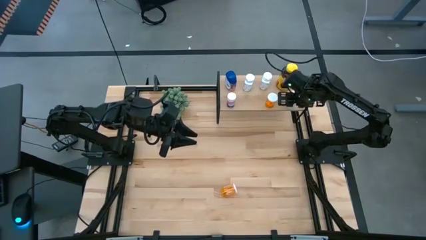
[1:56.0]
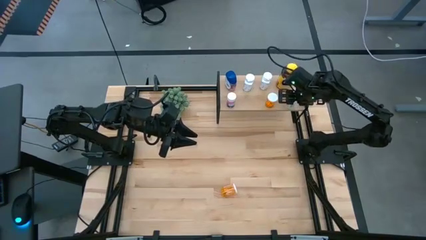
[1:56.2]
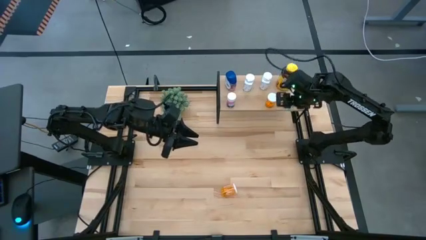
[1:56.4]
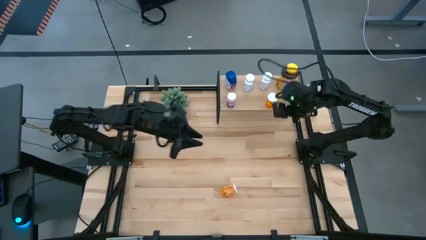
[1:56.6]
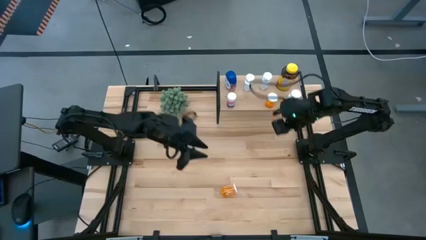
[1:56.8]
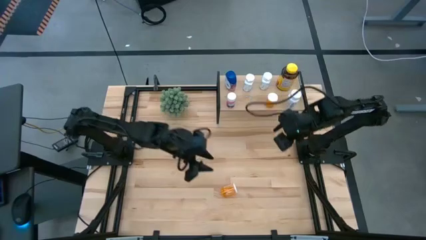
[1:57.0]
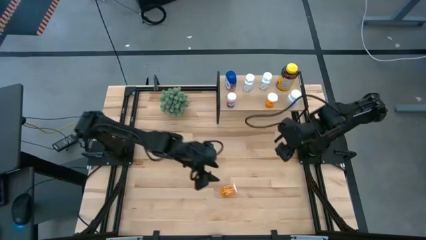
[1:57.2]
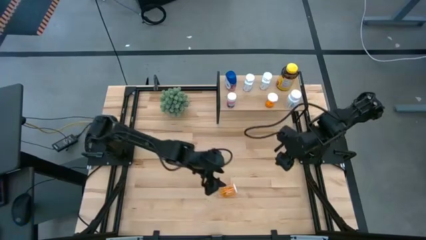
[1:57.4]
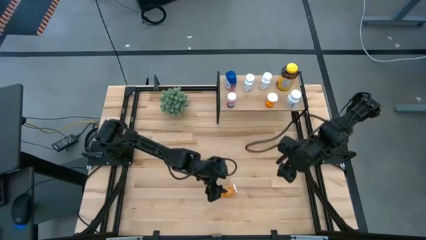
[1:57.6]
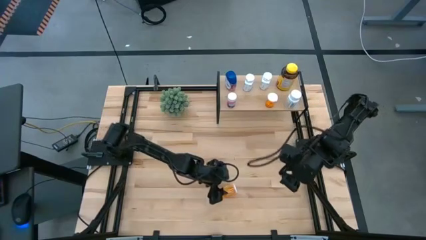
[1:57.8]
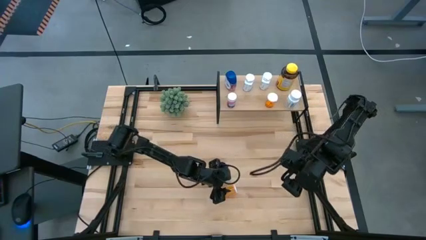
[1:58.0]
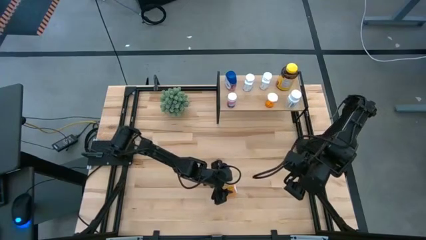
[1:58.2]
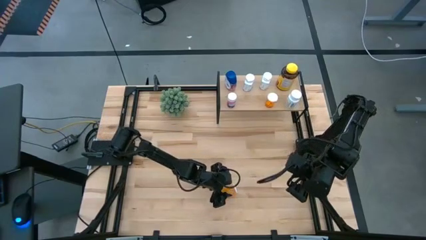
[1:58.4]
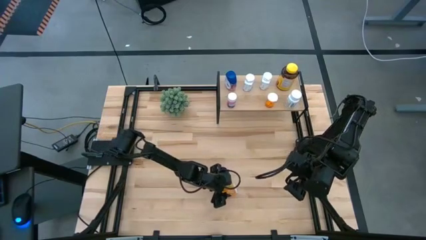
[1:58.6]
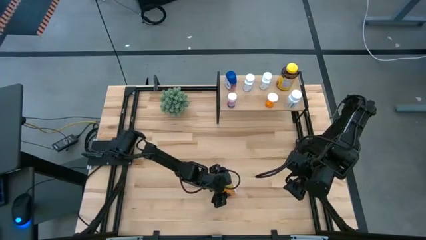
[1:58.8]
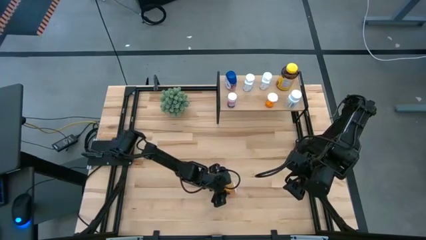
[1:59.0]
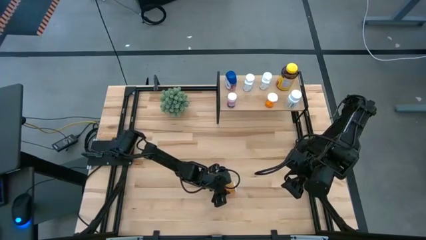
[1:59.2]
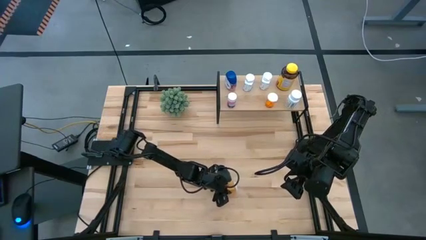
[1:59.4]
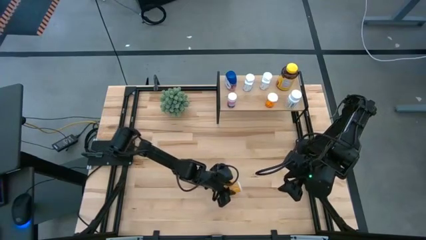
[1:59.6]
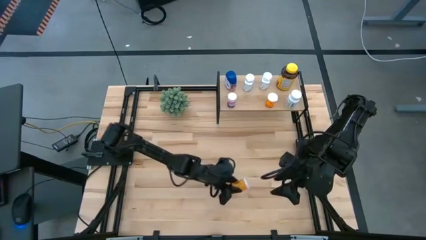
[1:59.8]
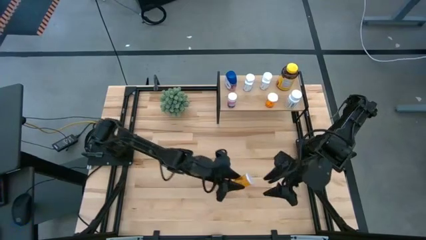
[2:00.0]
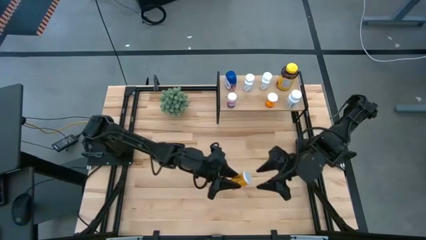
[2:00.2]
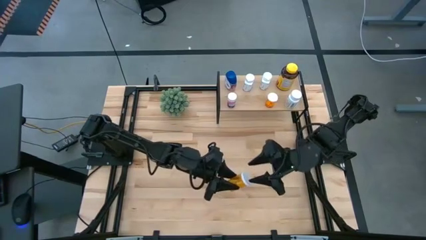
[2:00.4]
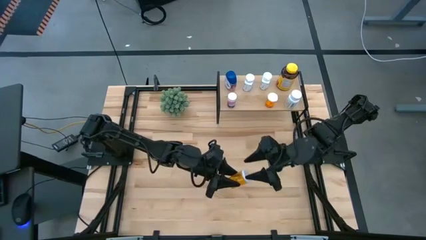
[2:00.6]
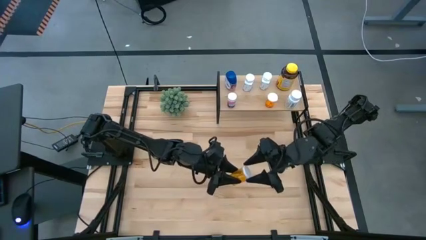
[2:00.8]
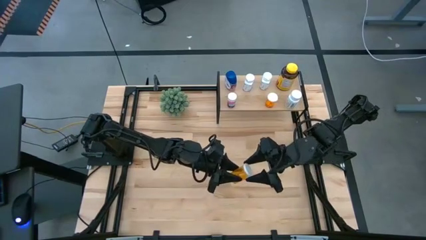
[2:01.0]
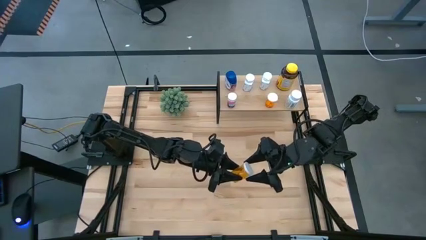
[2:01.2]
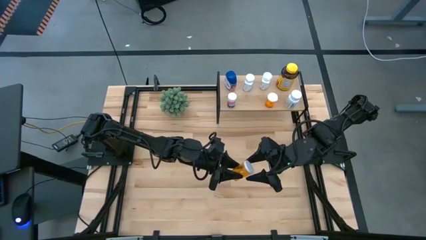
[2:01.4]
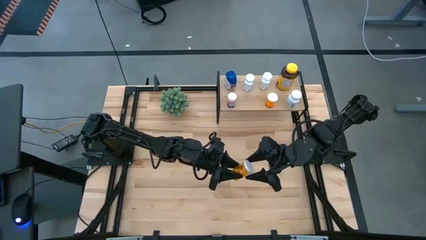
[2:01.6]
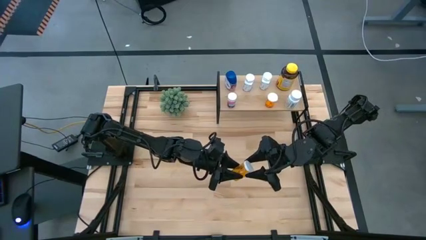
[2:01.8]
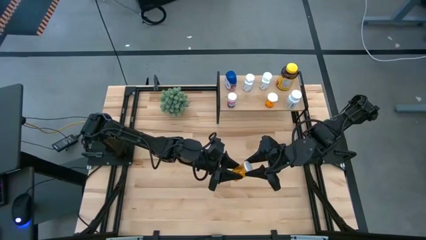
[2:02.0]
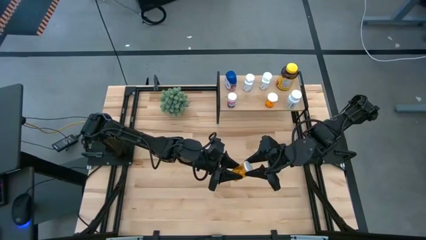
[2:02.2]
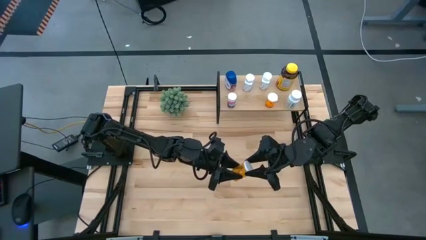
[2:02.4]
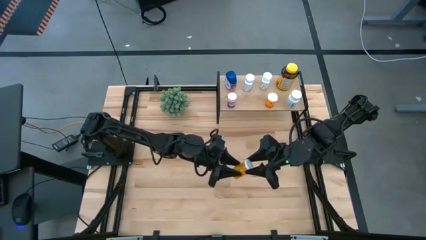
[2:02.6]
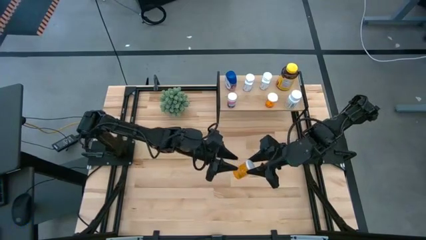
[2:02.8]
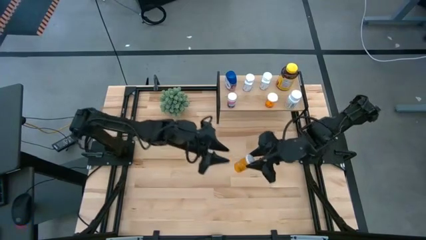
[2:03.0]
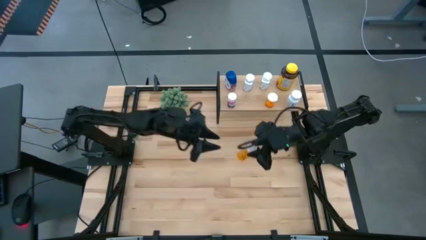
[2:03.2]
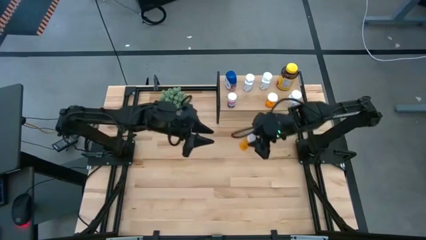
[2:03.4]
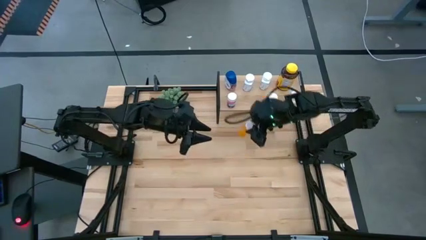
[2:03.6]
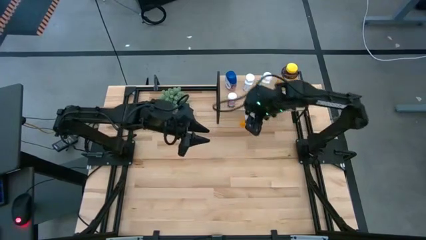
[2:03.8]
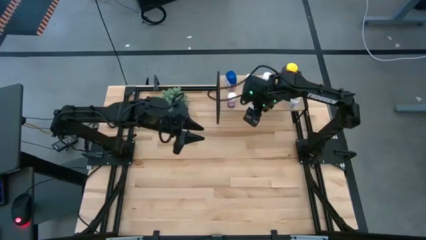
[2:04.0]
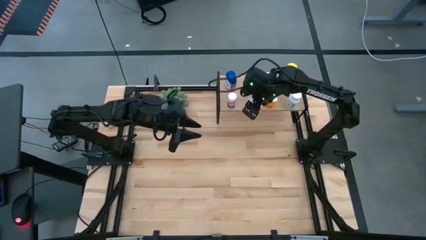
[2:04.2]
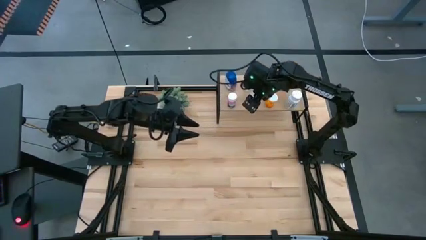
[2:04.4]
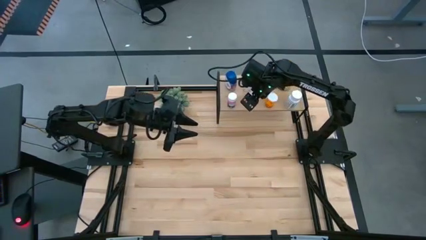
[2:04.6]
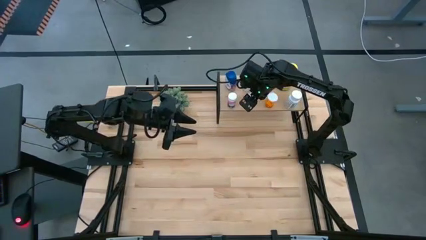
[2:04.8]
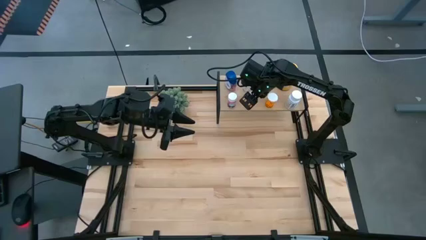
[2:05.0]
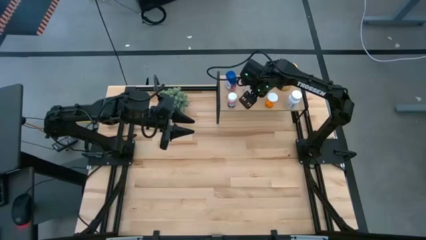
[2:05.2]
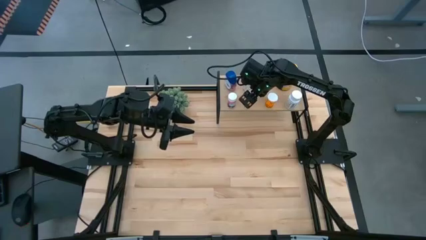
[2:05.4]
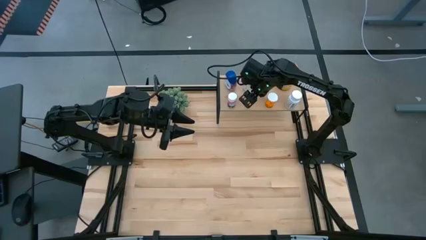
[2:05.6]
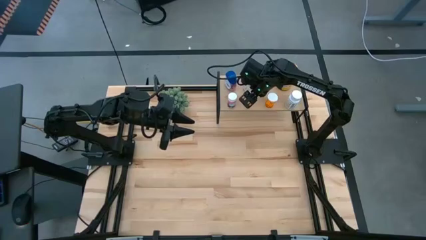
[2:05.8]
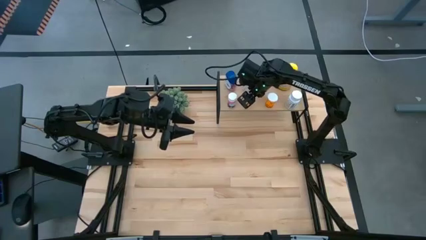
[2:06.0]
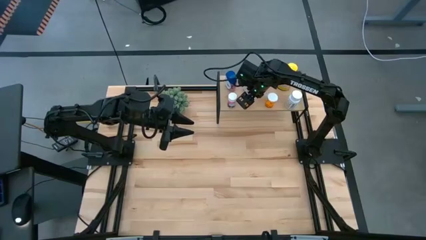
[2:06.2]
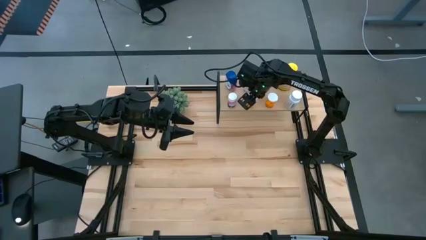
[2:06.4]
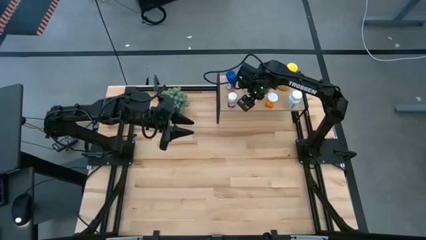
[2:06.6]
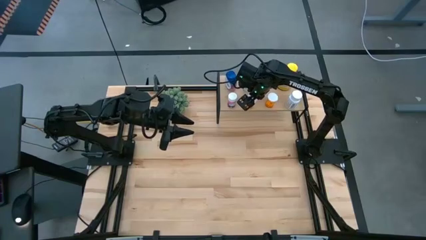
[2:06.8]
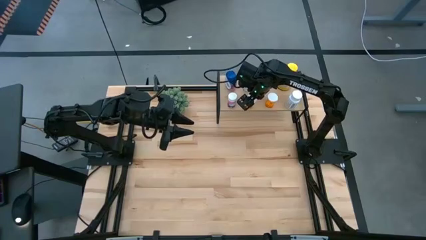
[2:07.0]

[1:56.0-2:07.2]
Task: Pick and place medicine bottles onto shelf by color
Put the orange medicine bottle on the shelf

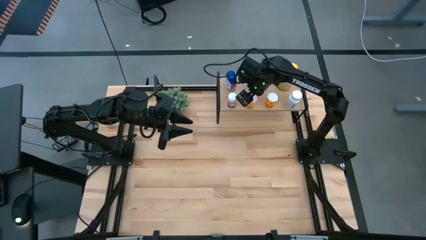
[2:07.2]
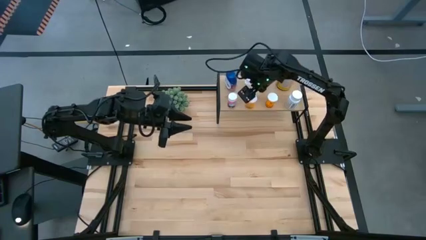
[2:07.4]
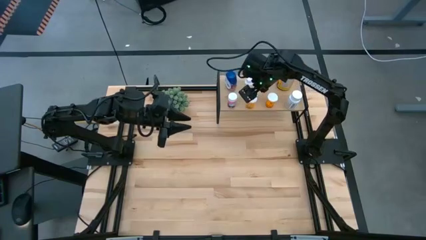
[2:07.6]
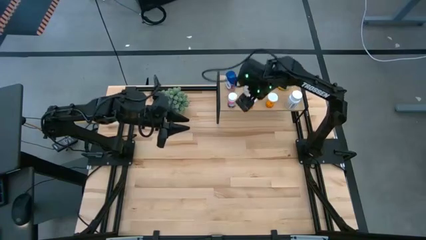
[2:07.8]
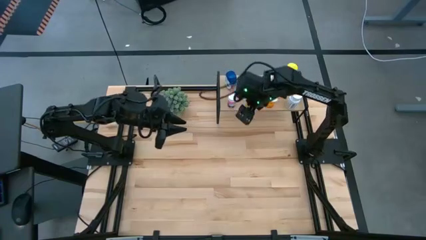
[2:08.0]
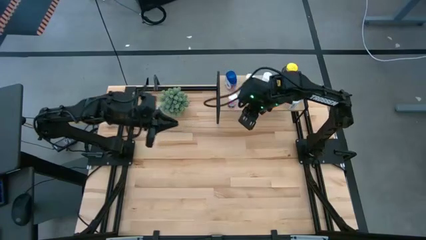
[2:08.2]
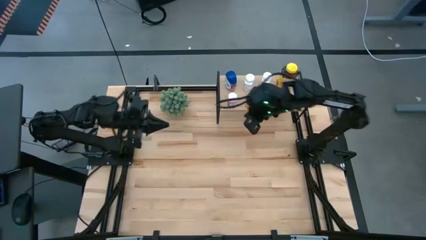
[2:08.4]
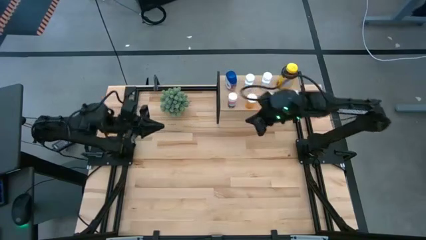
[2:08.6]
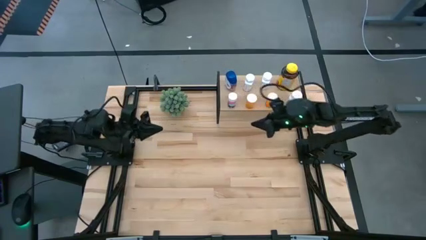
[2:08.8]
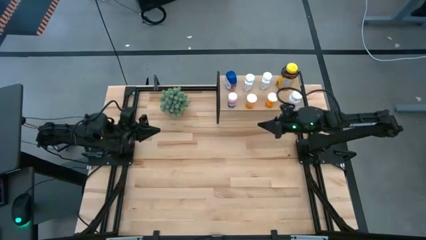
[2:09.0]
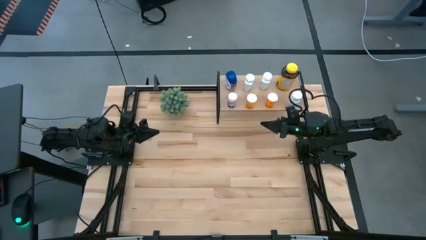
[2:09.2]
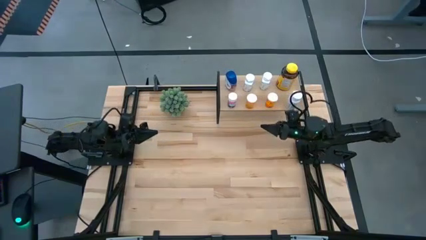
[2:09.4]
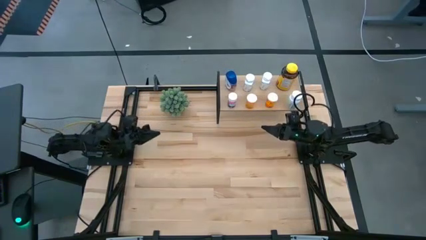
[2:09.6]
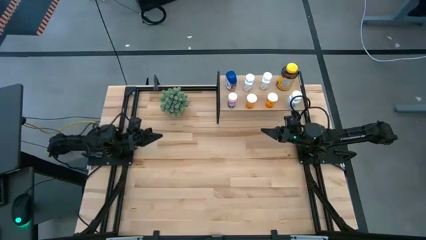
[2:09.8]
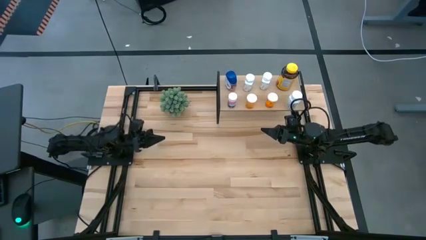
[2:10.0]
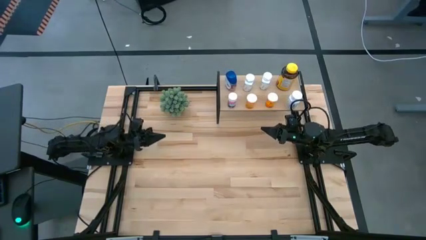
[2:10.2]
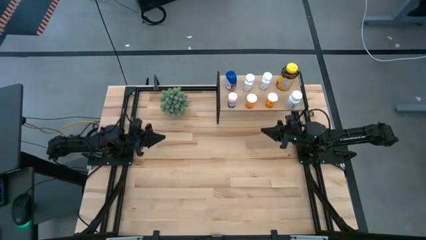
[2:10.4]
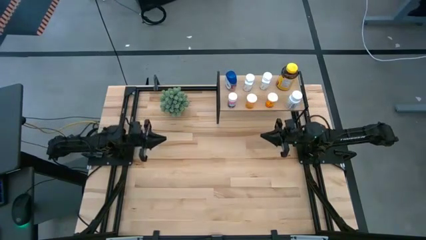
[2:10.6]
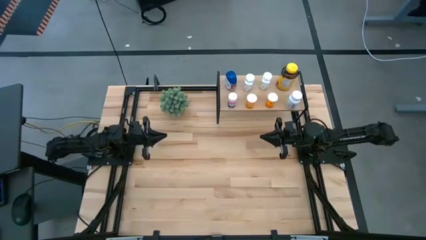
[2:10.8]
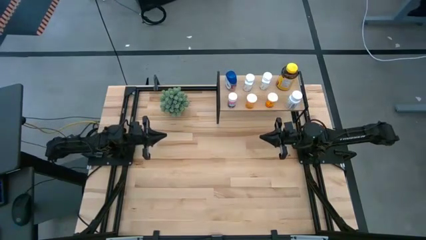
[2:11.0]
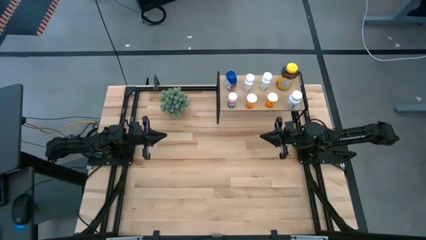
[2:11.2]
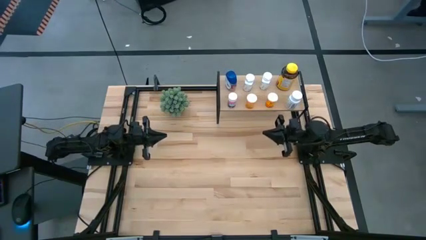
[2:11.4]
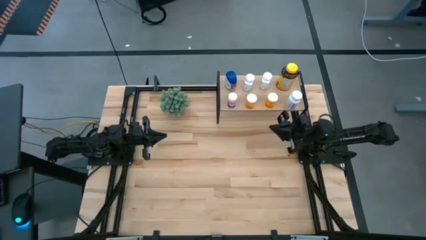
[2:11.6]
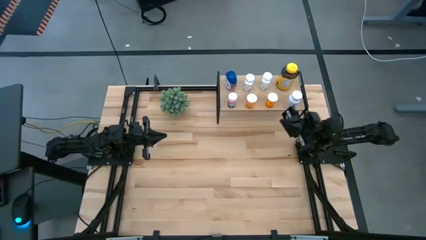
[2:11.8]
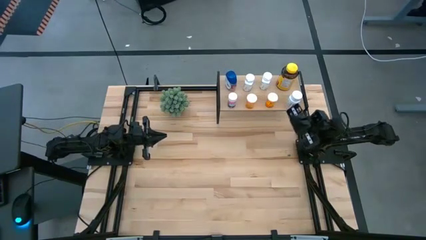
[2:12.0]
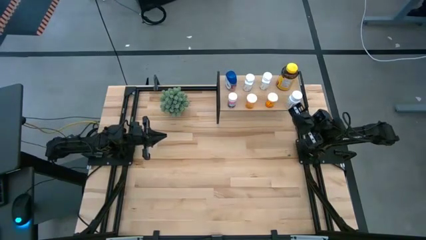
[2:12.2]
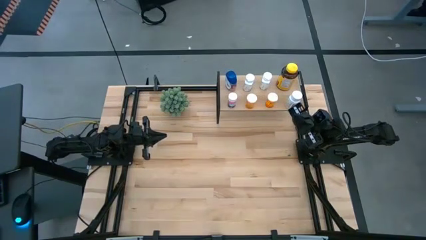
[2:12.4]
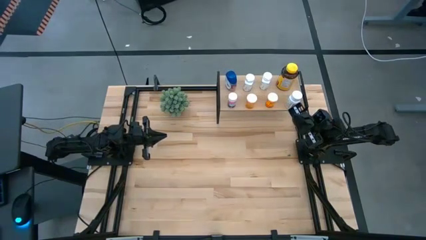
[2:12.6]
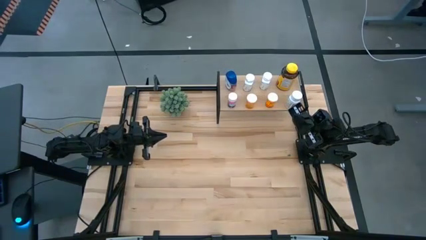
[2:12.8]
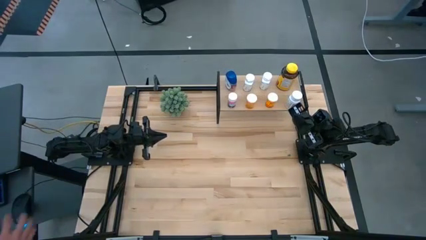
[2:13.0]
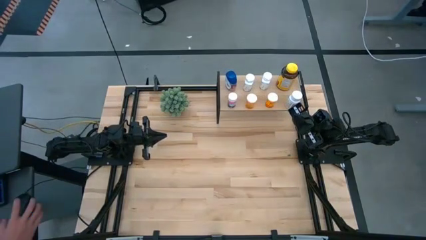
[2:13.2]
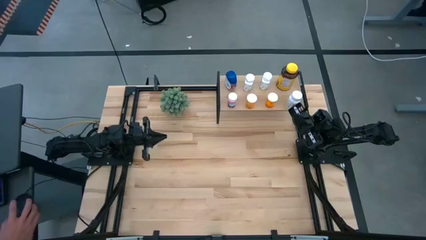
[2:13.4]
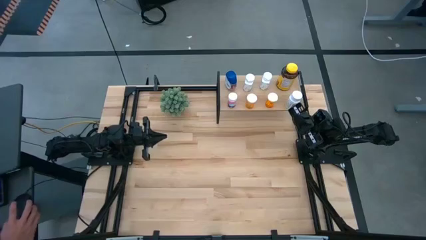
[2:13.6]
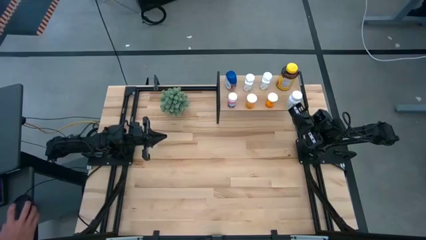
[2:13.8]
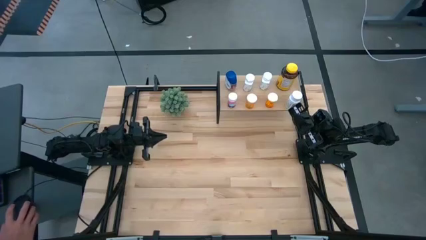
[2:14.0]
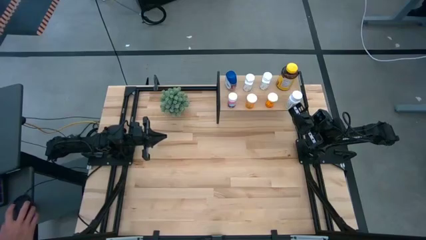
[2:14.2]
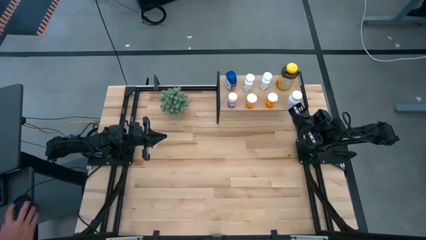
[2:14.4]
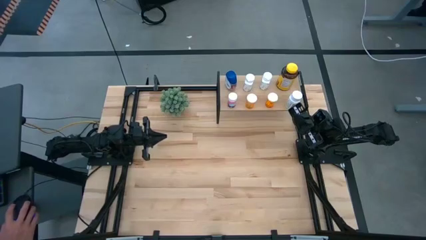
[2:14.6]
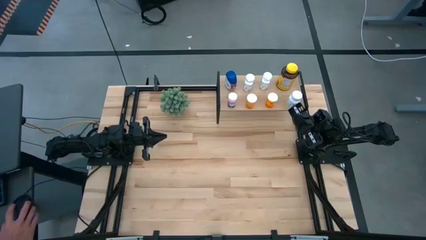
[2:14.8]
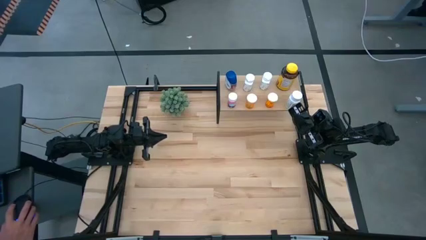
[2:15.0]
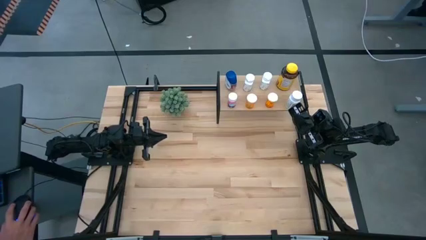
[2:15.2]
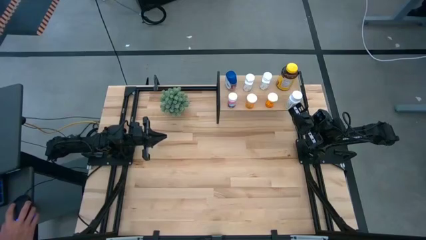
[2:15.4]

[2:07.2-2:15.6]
Return to Home Position
